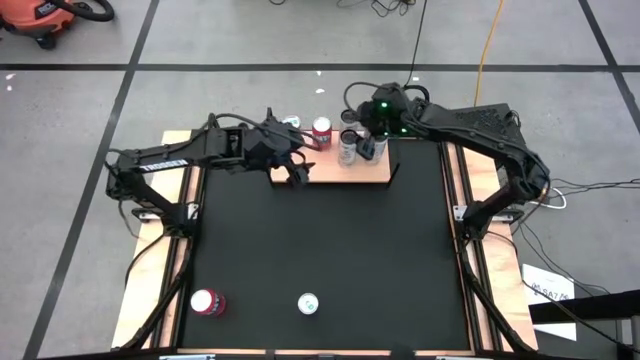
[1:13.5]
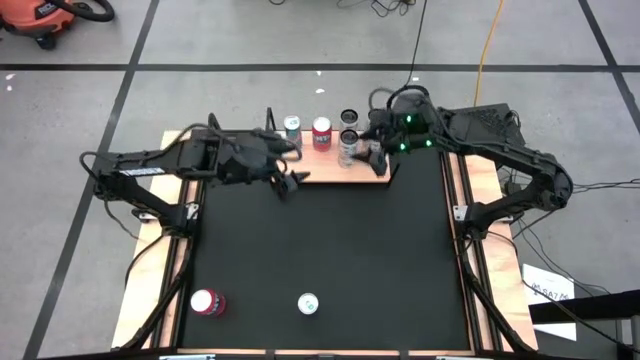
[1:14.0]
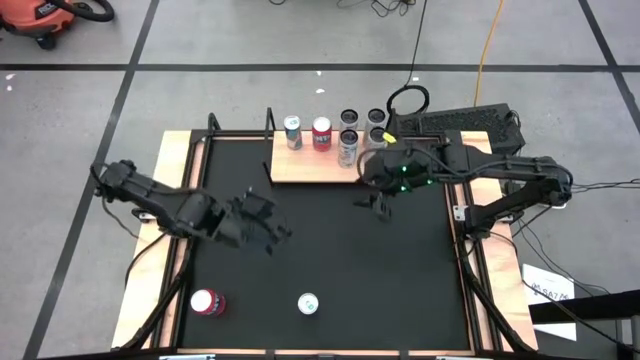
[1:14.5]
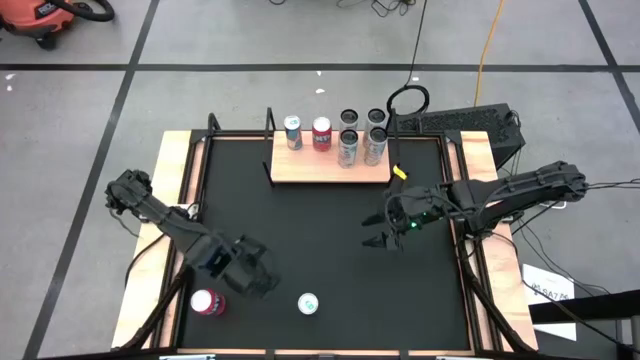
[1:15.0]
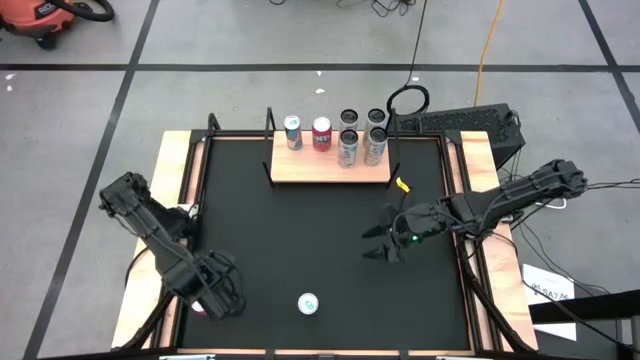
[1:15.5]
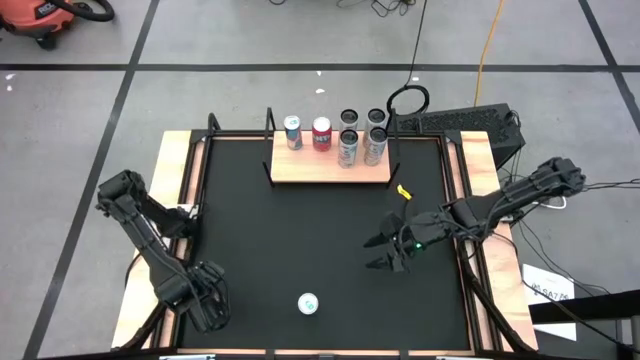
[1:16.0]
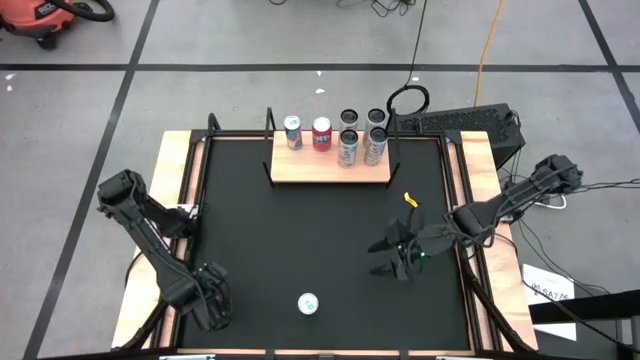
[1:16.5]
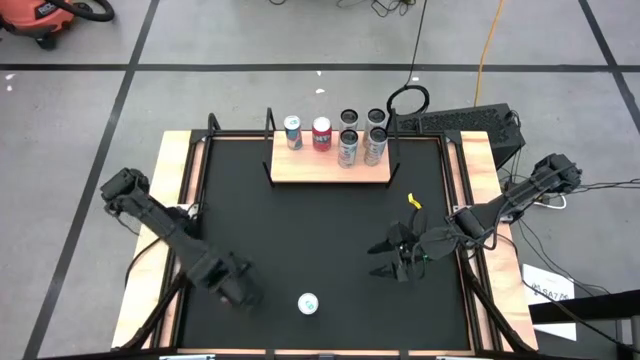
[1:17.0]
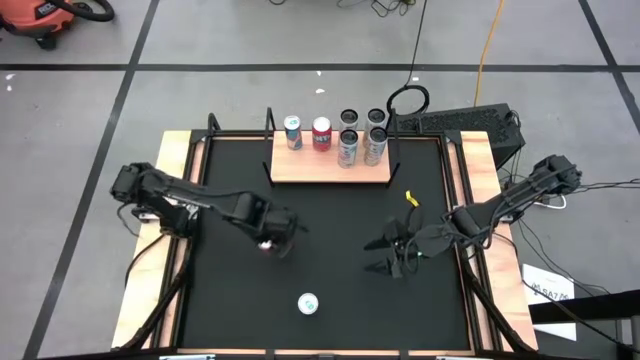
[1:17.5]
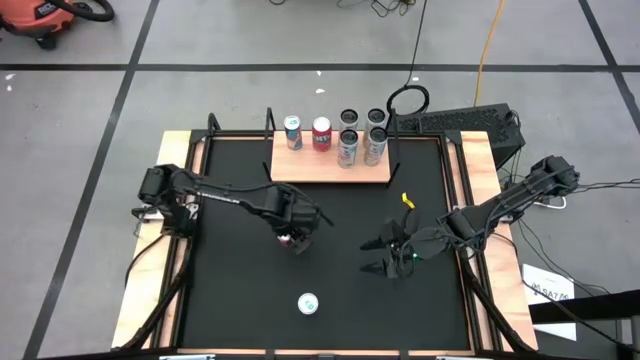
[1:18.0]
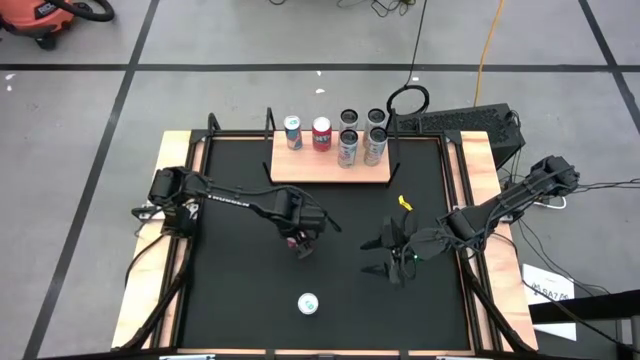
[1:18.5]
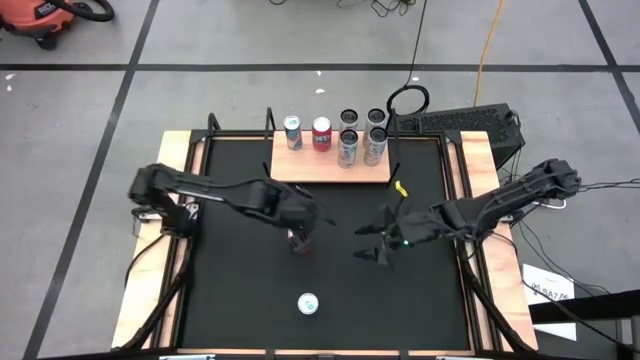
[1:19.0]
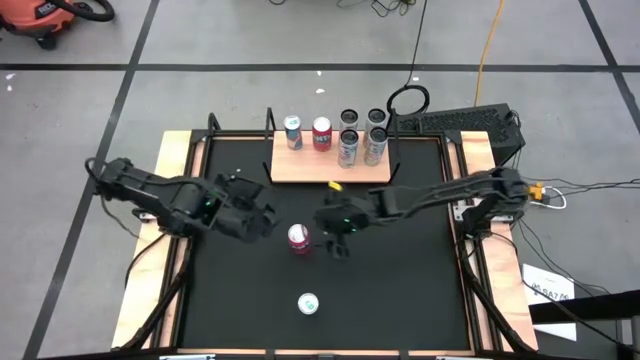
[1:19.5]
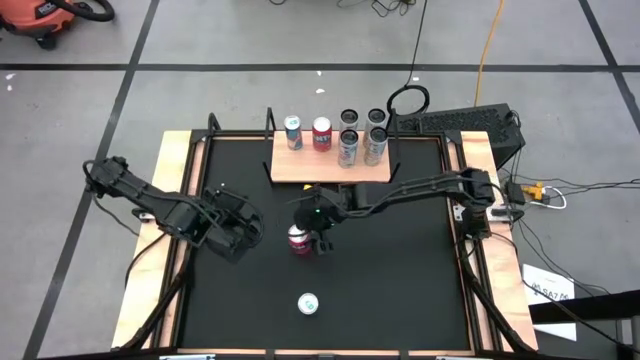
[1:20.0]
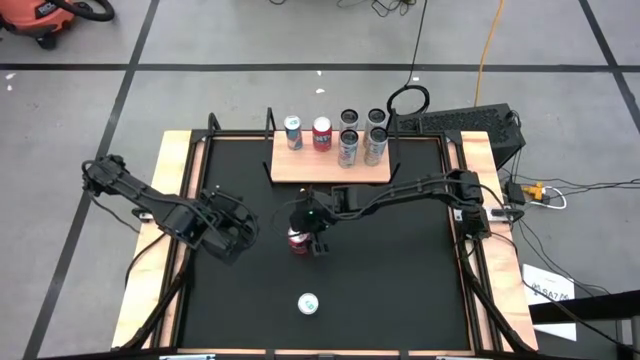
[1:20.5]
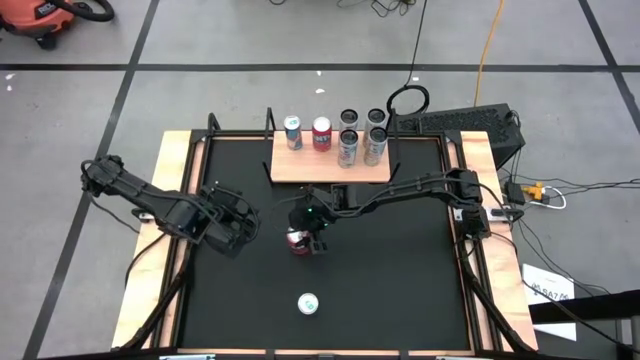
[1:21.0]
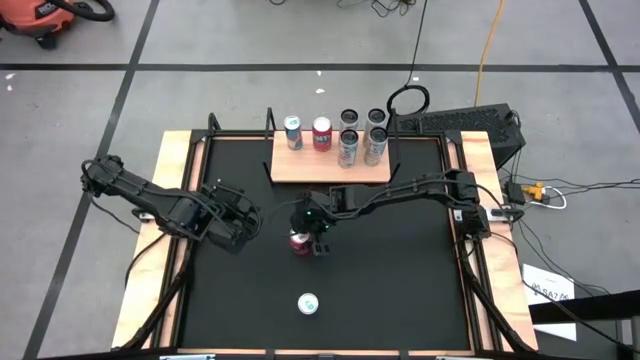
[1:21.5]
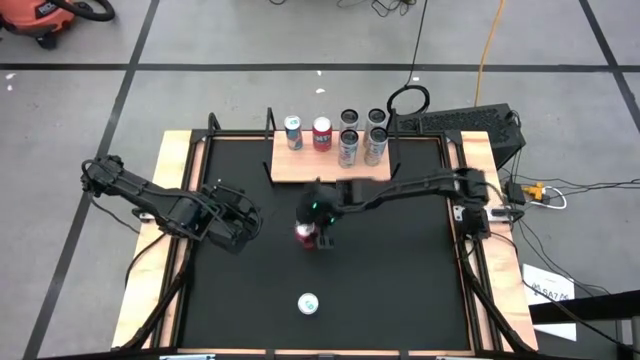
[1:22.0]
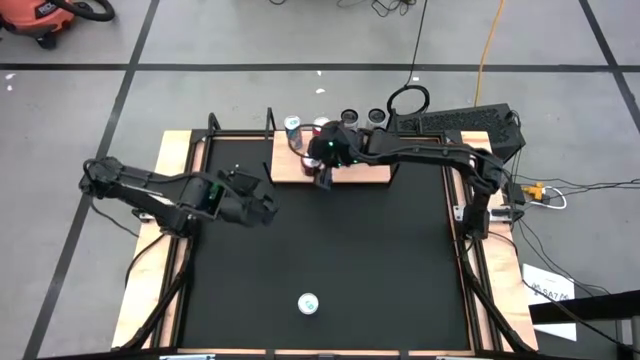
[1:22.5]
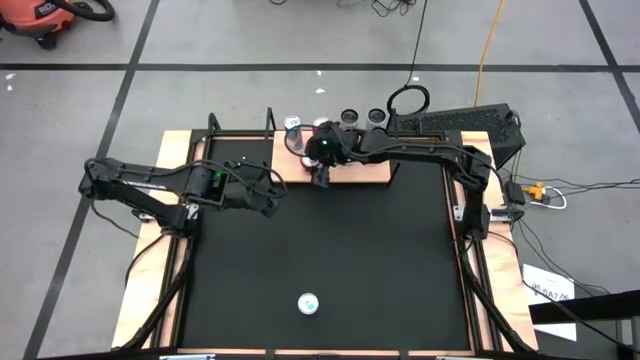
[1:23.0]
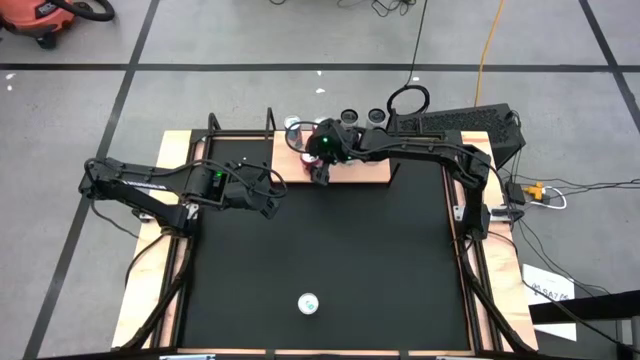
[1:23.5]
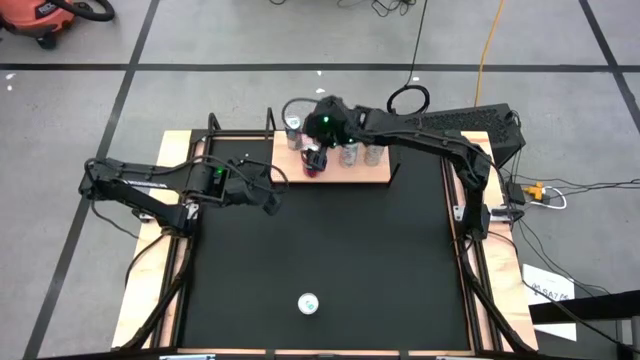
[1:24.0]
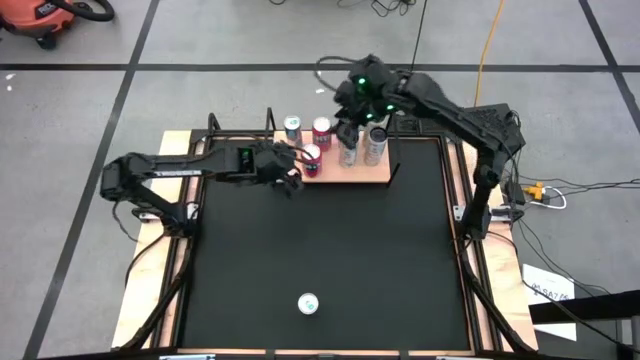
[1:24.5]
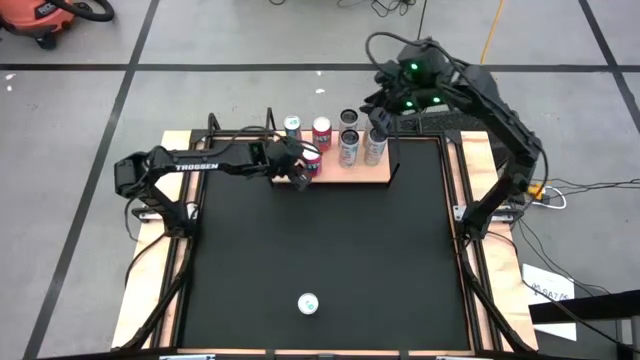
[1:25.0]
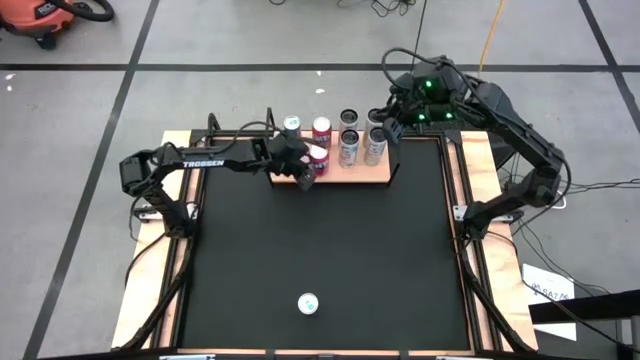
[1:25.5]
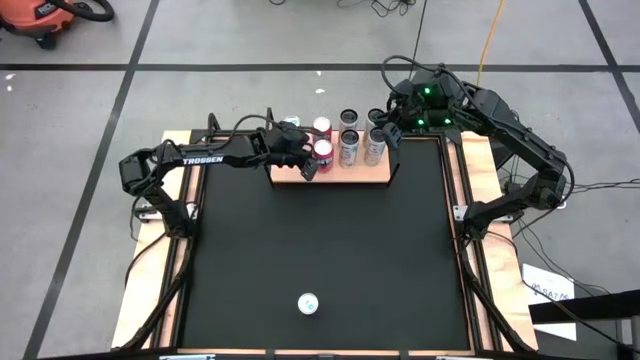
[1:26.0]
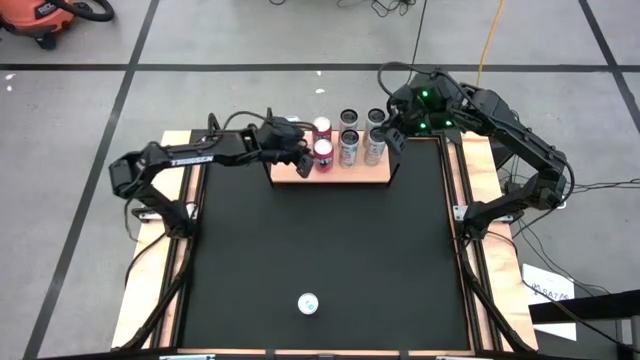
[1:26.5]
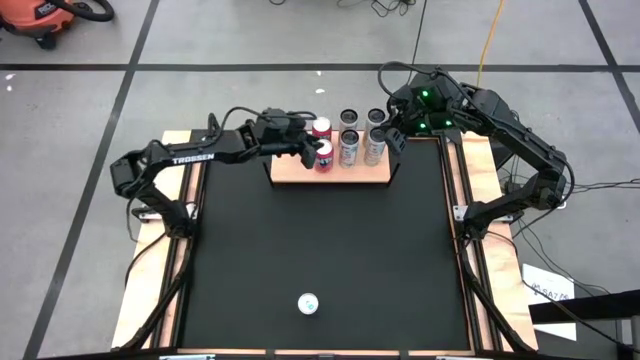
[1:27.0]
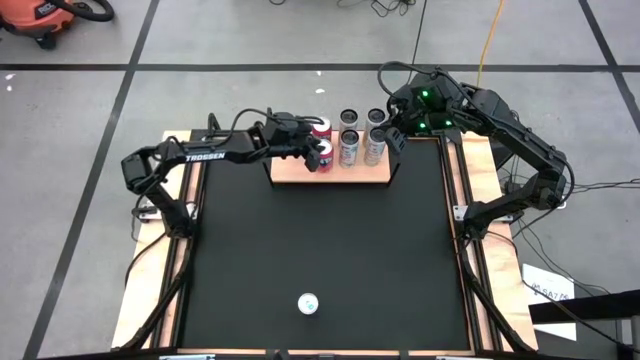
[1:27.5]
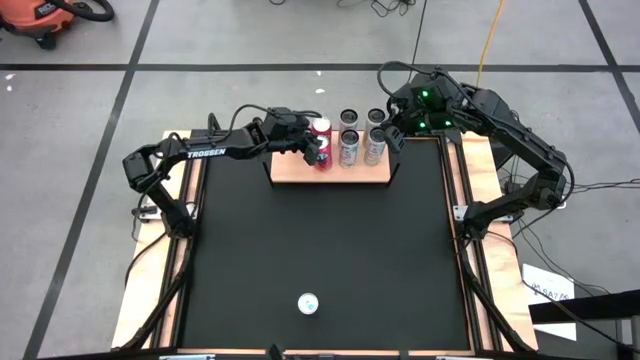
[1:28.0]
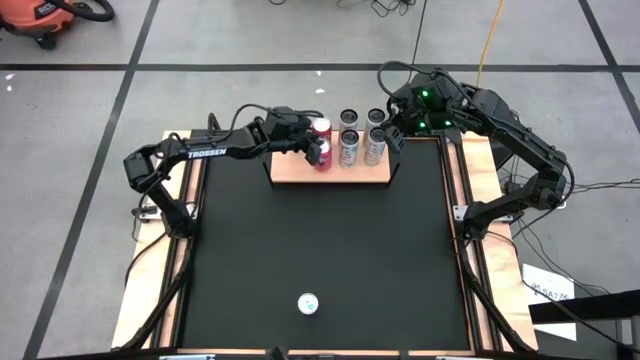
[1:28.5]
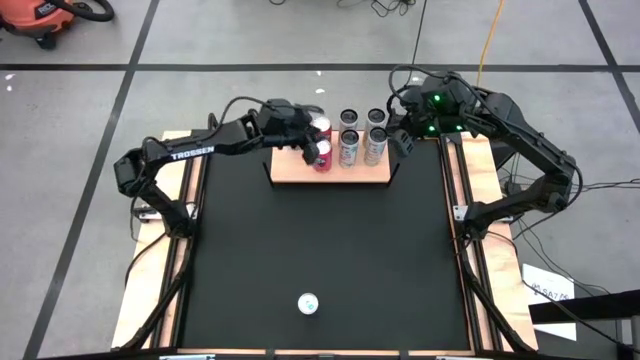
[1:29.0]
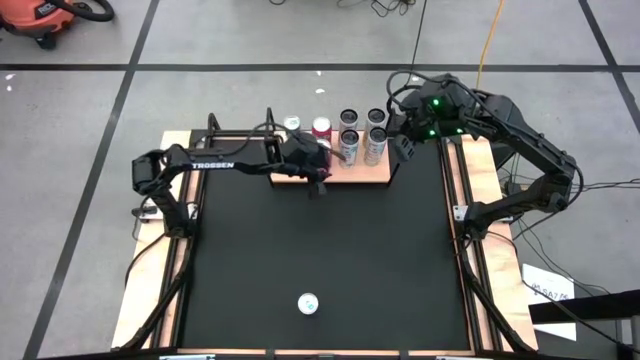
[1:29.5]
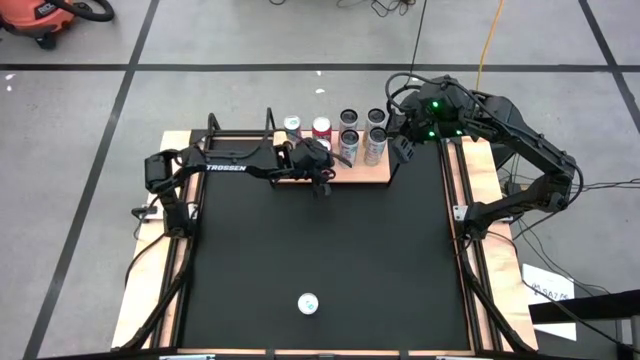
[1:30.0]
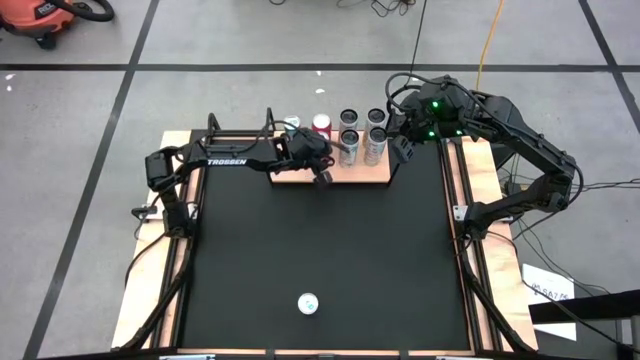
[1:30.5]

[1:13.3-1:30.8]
Task: Place canned beverage on shelf
Put the orange soda can on the shelf aligned with the other orange soda can

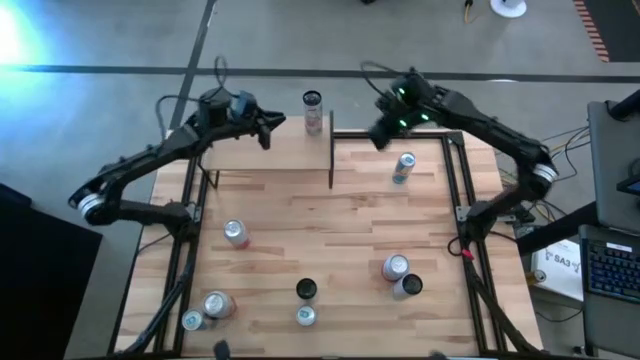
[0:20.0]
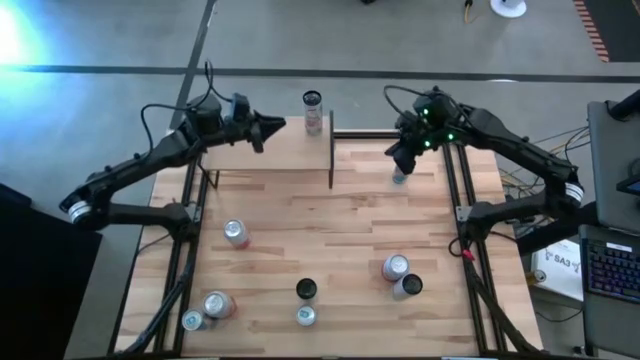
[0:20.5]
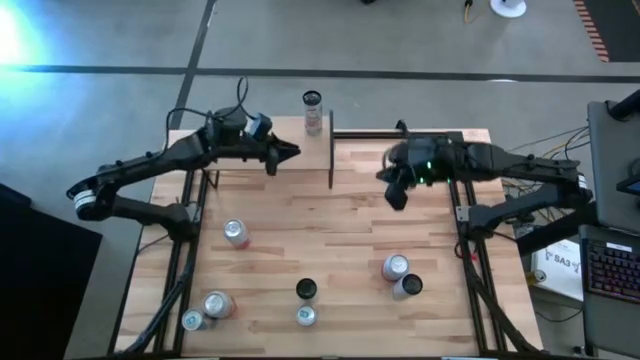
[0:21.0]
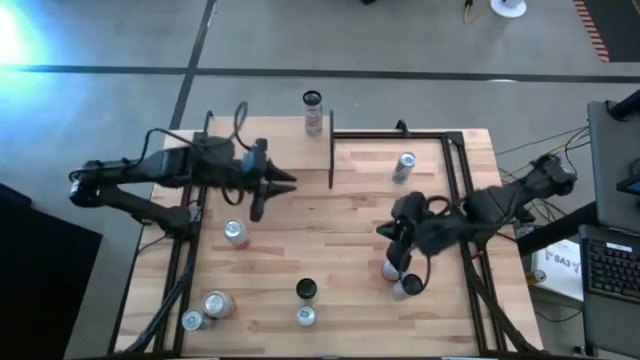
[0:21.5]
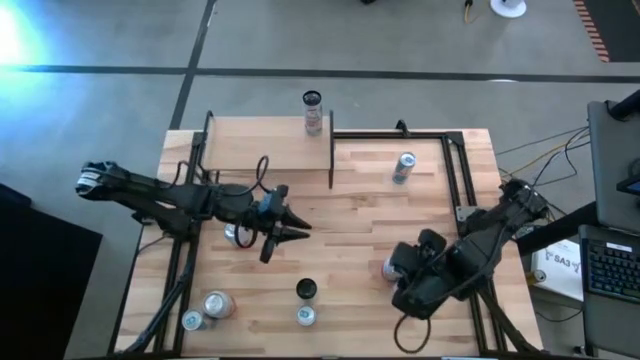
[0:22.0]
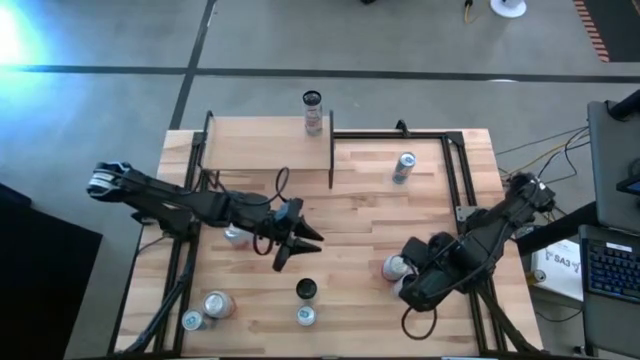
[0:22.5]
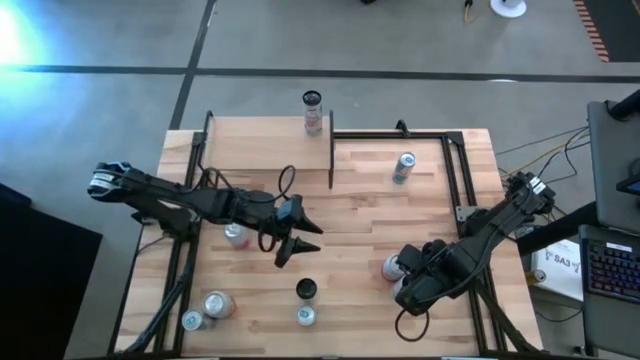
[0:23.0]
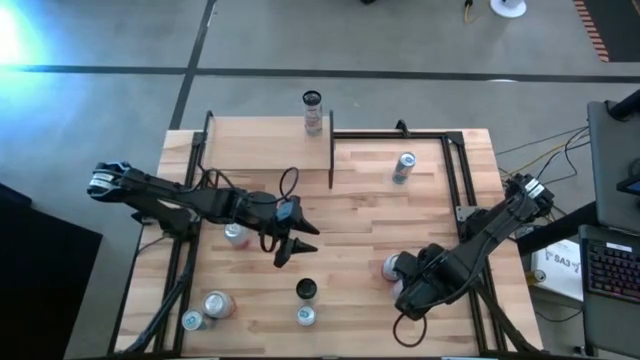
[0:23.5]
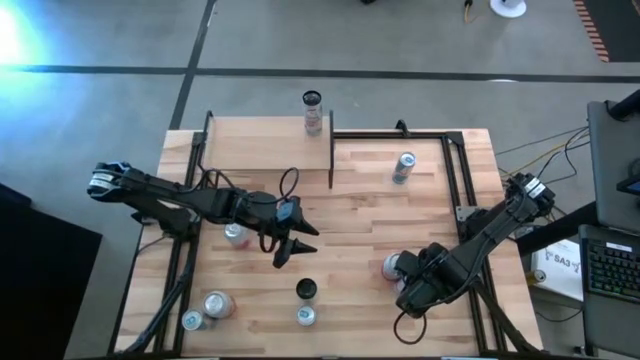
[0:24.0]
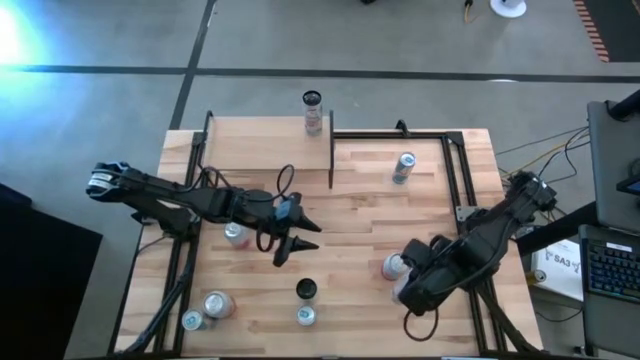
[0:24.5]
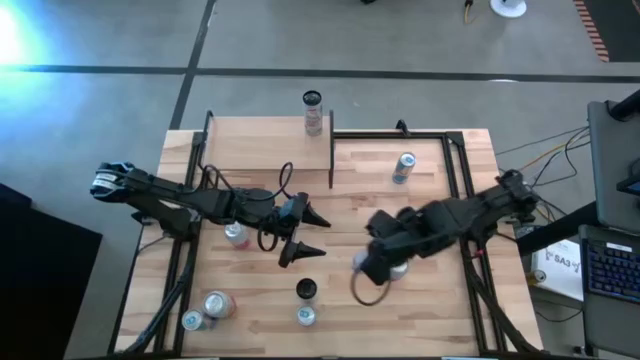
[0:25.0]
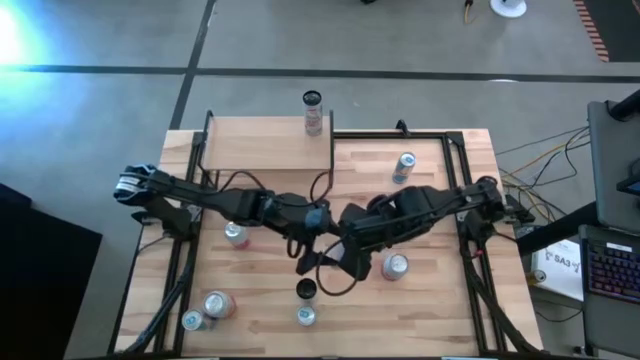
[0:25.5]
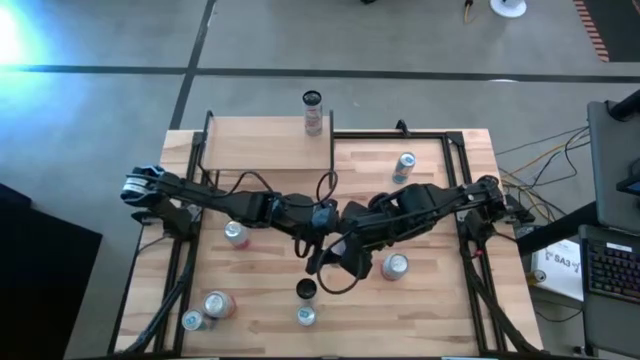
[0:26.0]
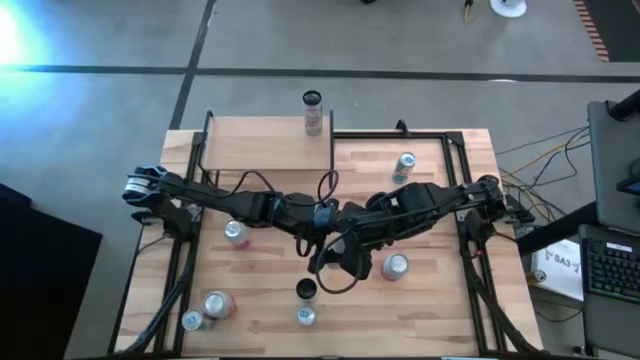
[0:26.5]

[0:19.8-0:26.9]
Task: Place canned beverage on shelf
Put the right white-pink soda can on the shelf aligned with the other white-pink soda can
